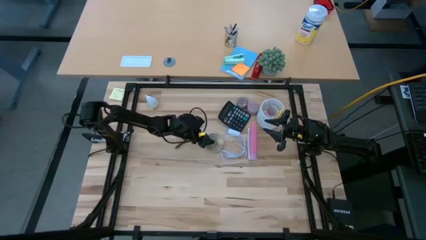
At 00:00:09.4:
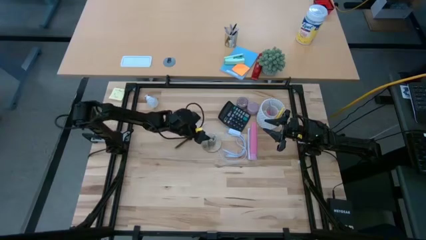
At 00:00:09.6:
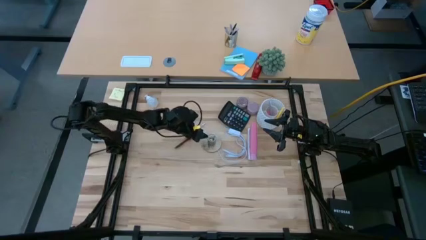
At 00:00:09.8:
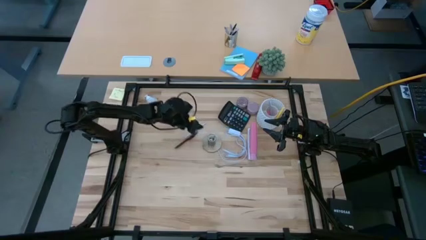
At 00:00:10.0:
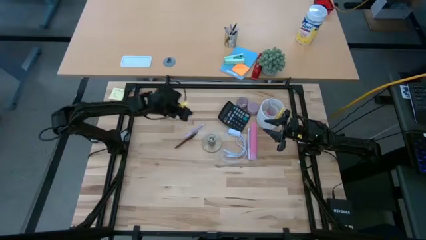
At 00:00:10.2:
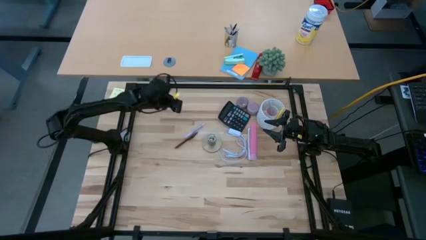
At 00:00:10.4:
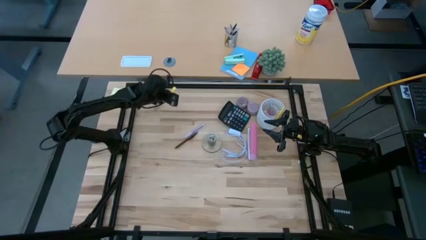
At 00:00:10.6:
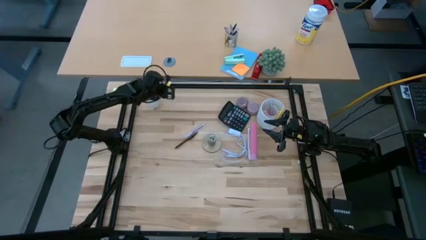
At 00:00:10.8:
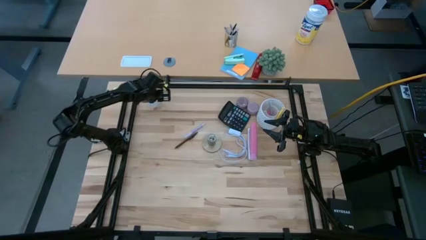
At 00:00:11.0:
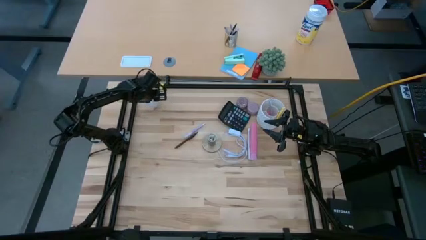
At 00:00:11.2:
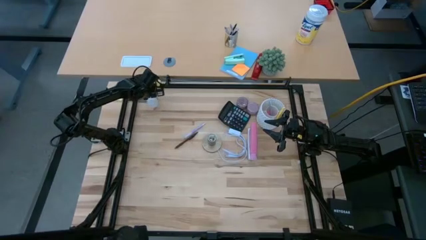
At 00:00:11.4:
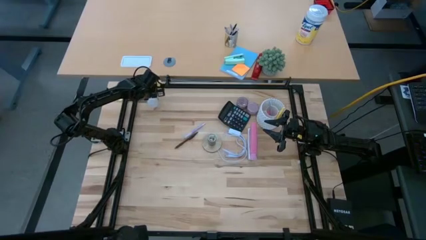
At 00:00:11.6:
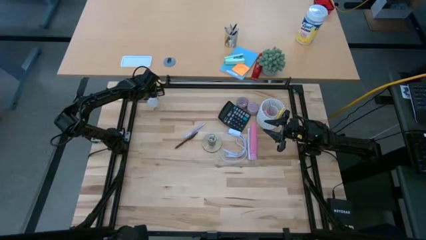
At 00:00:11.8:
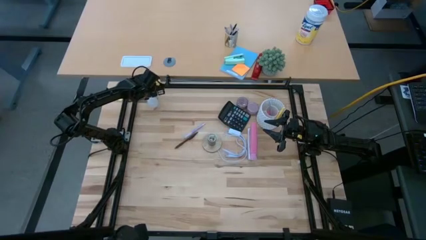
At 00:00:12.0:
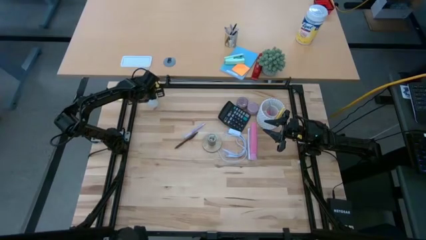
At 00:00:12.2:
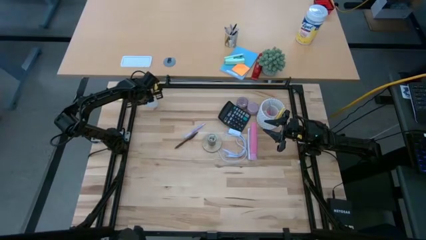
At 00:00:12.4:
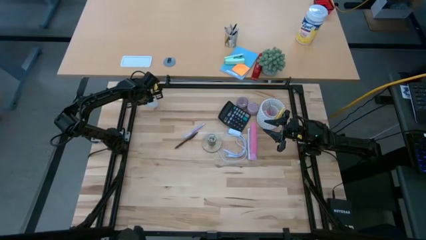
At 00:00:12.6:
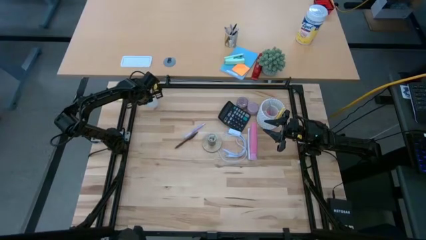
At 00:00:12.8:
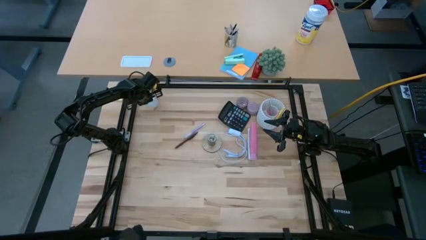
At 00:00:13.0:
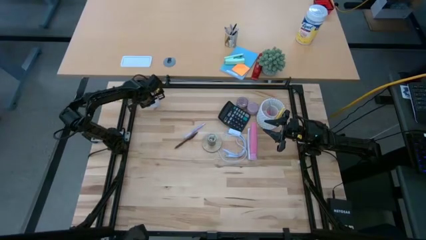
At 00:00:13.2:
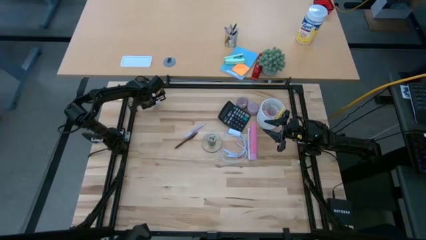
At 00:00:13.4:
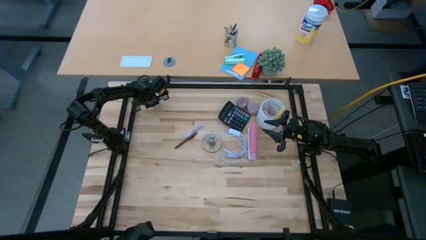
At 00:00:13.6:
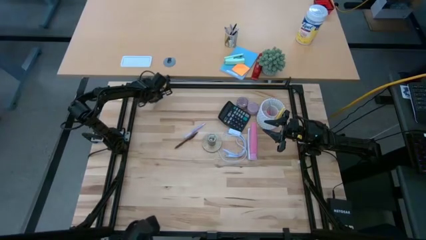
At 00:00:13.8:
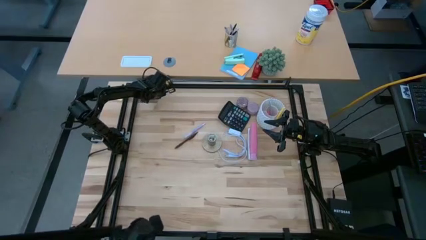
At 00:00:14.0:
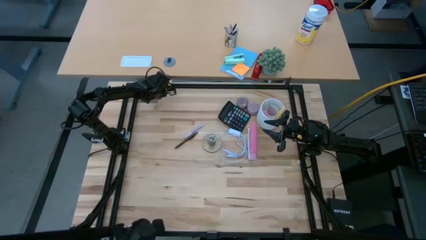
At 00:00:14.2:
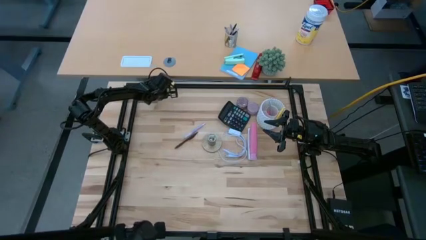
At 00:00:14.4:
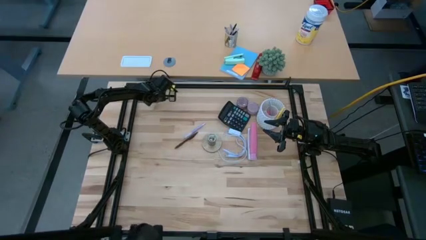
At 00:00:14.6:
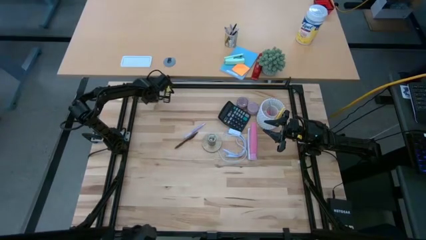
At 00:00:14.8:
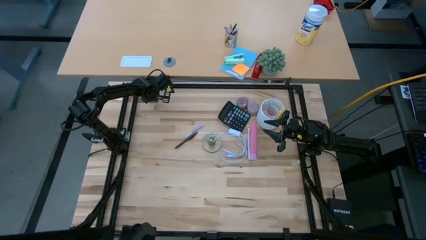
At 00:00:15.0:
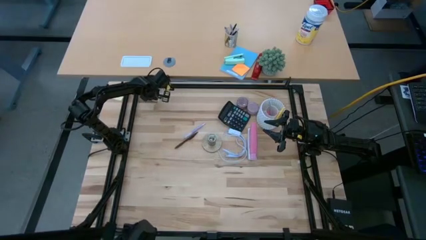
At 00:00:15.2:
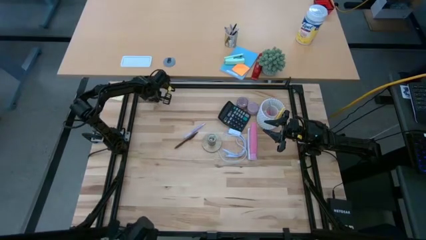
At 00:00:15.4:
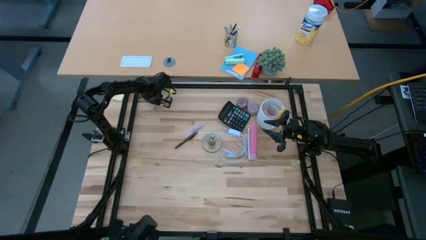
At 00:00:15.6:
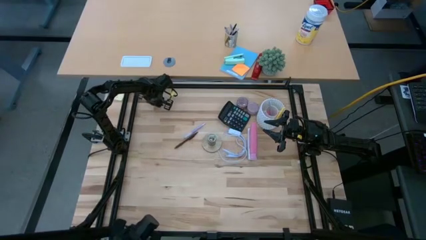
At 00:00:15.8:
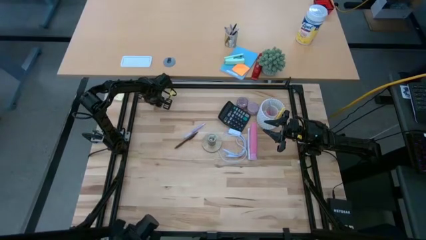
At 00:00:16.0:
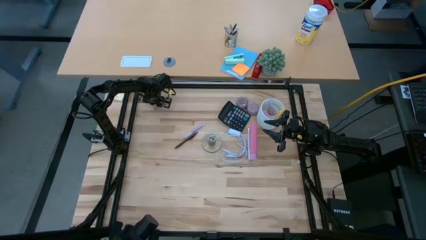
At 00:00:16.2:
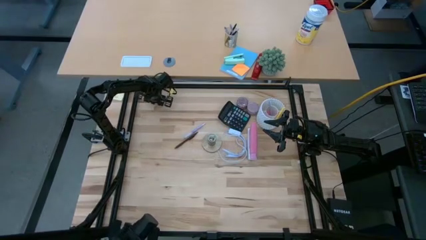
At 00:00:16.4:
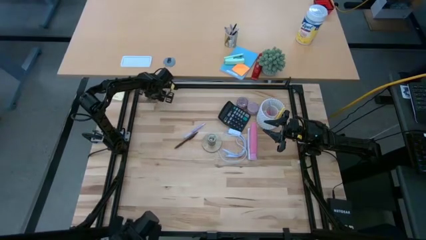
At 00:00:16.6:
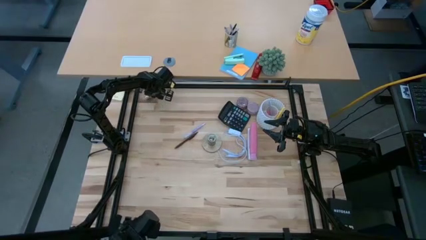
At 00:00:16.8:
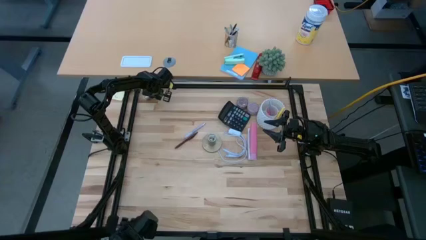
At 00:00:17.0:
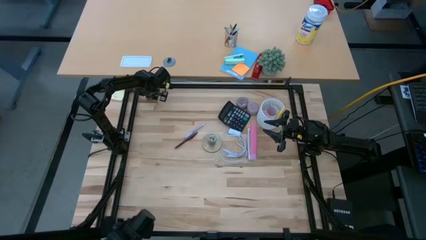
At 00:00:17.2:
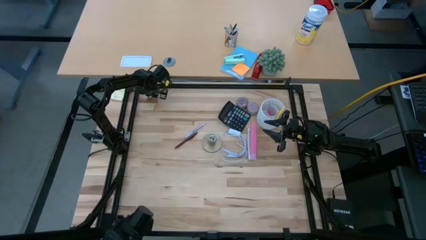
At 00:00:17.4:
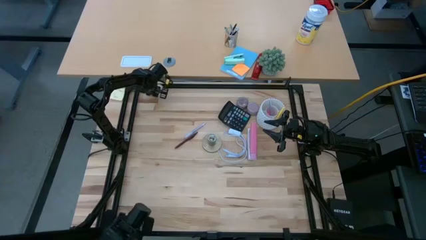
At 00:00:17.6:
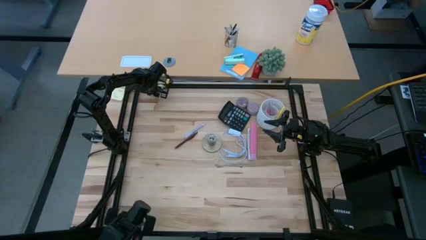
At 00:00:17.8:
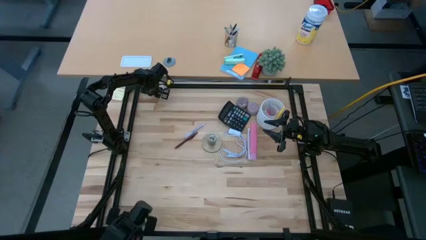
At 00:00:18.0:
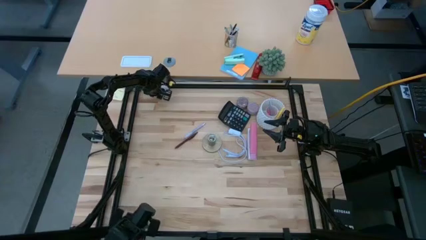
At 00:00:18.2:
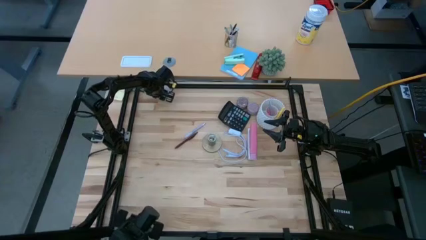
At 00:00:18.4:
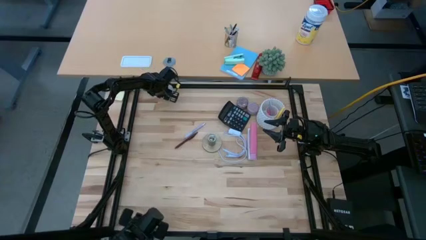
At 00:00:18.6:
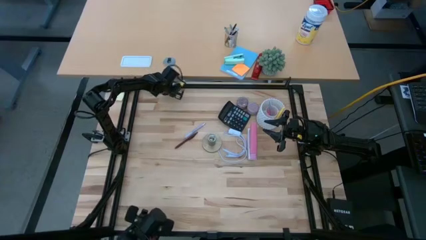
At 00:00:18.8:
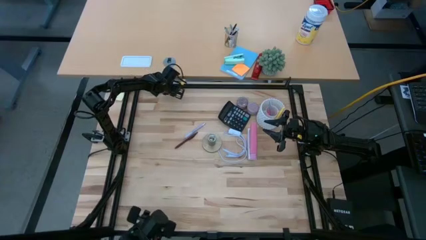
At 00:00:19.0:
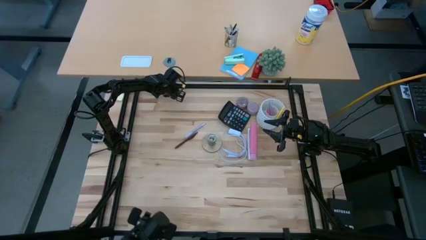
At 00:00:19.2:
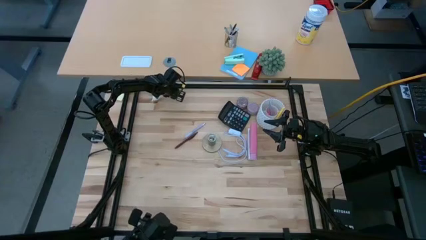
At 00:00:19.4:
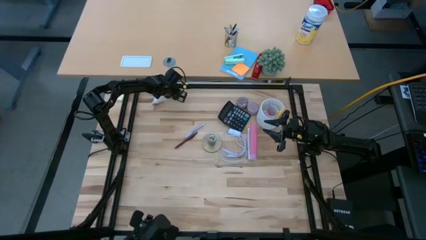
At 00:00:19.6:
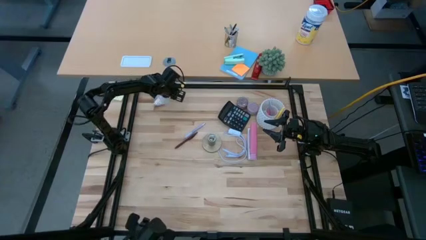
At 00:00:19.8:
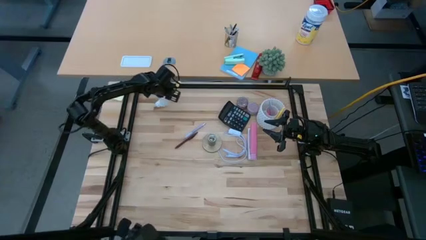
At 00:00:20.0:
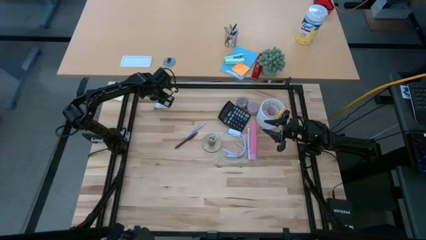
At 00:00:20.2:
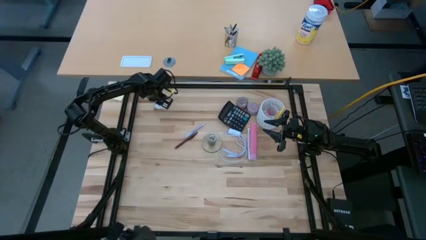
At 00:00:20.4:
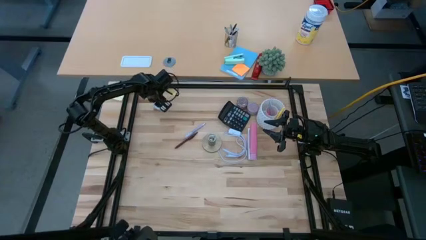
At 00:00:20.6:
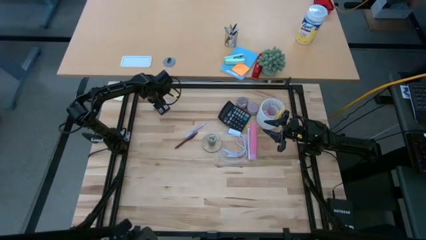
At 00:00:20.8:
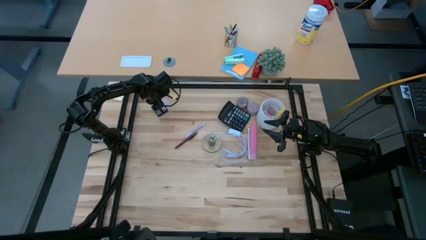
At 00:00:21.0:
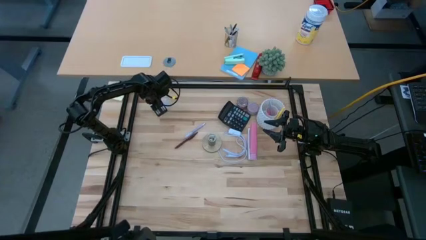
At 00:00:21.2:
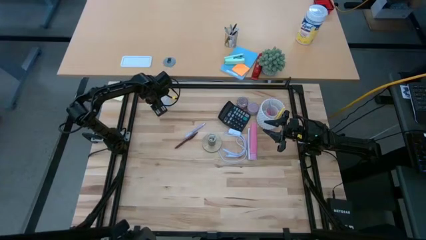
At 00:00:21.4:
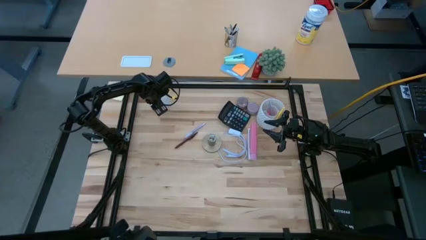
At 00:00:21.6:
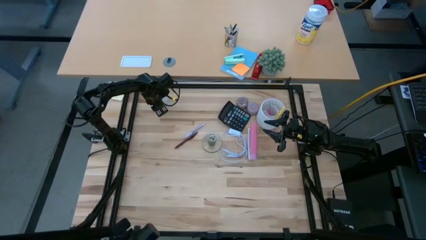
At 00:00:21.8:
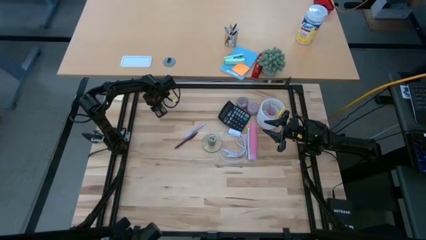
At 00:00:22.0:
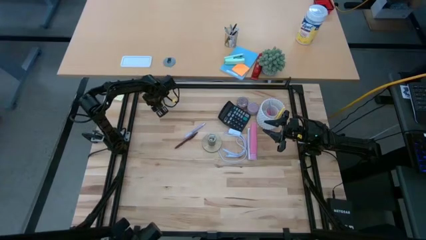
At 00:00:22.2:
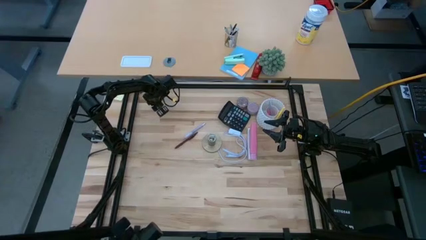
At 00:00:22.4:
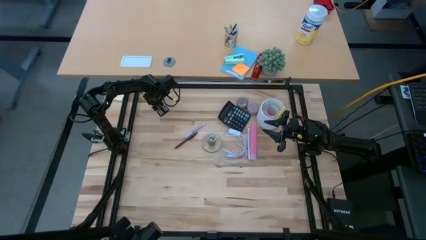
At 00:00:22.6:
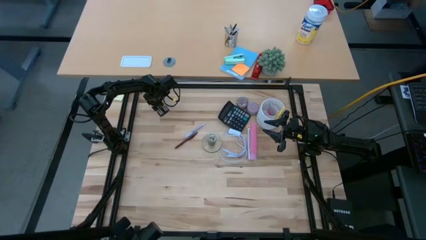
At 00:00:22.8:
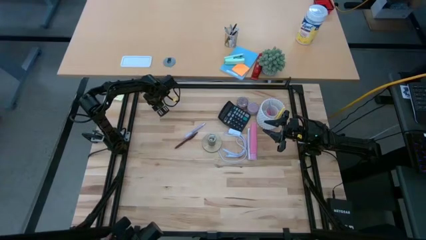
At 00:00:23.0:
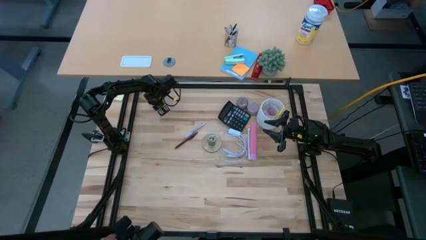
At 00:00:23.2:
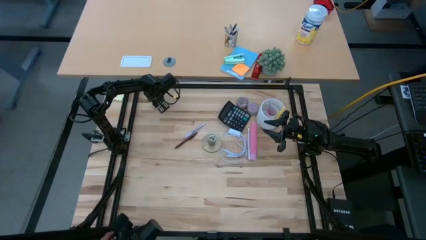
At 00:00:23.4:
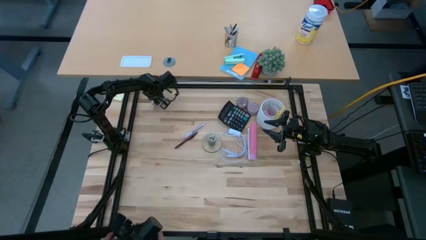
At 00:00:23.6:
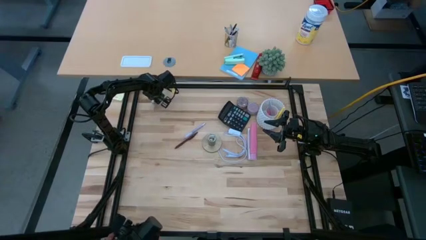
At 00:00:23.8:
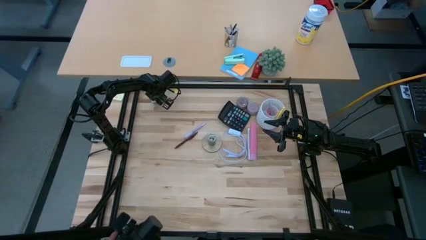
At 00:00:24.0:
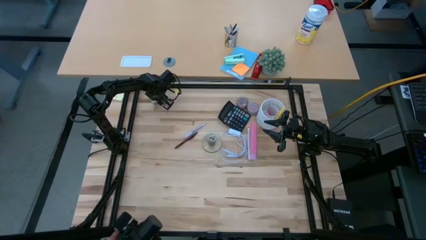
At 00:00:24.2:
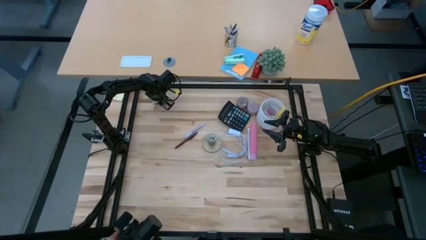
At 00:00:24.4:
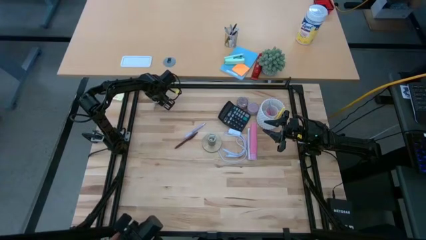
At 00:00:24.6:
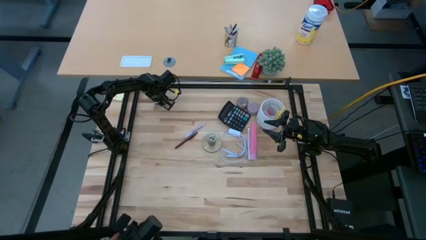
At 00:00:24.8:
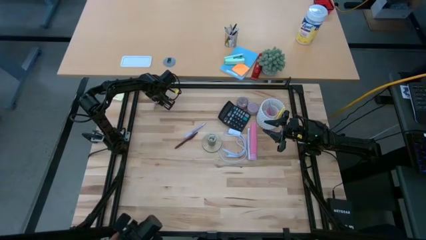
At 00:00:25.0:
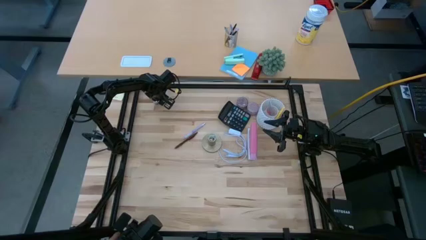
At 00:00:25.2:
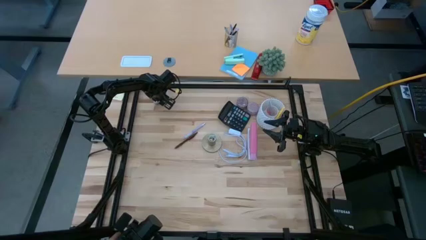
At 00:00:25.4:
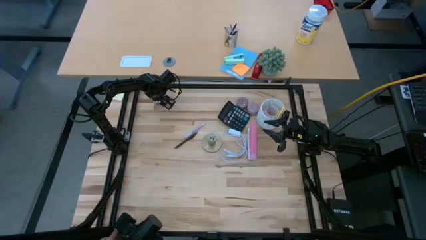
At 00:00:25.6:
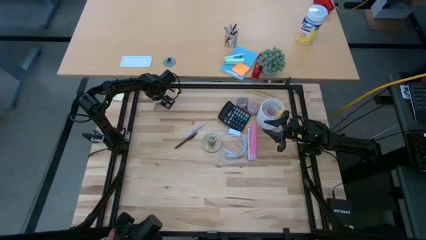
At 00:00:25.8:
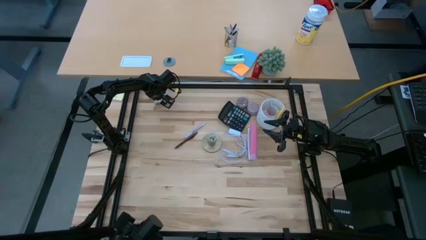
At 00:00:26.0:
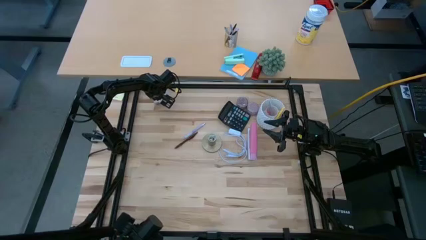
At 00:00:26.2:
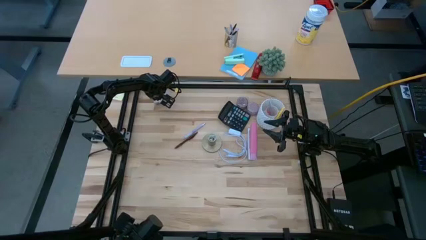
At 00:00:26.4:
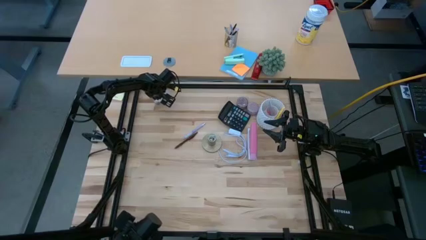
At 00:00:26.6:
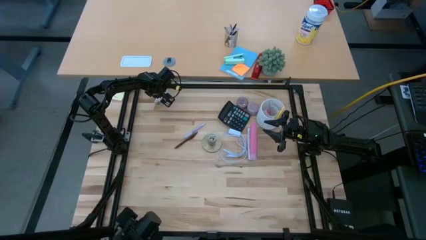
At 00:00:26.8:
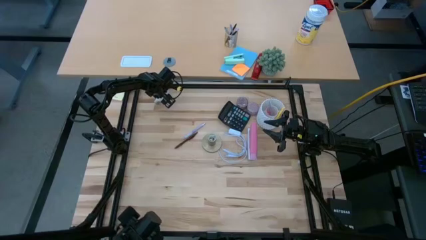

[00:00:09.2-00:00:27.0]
Task: Screw lightbulb
Insert the lightbulb into the gold lamp
